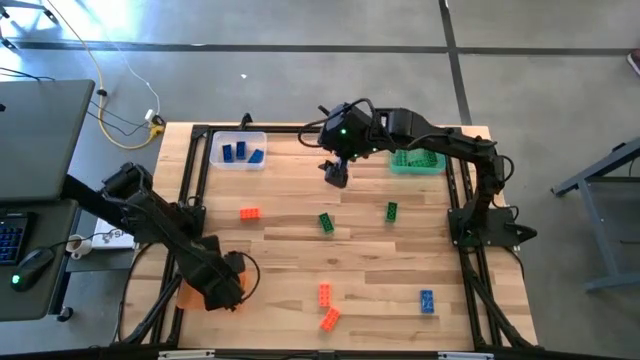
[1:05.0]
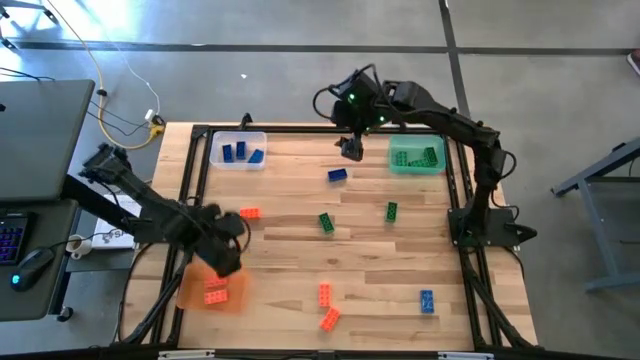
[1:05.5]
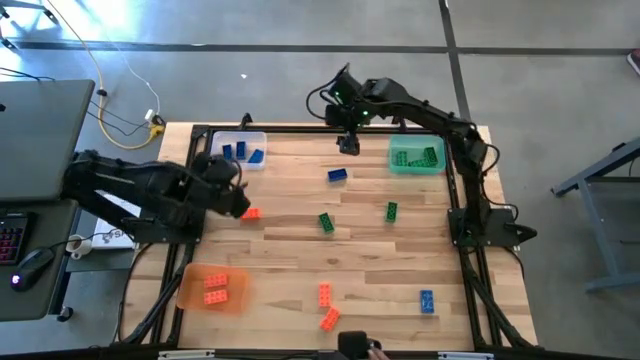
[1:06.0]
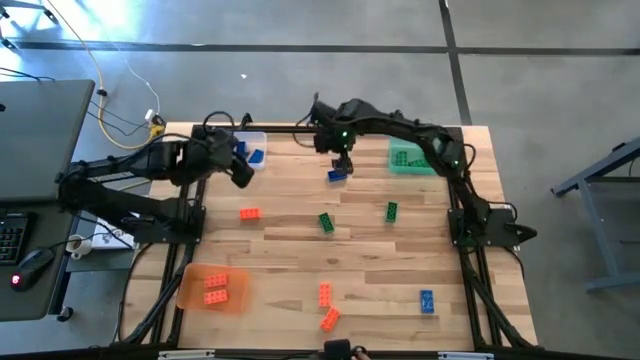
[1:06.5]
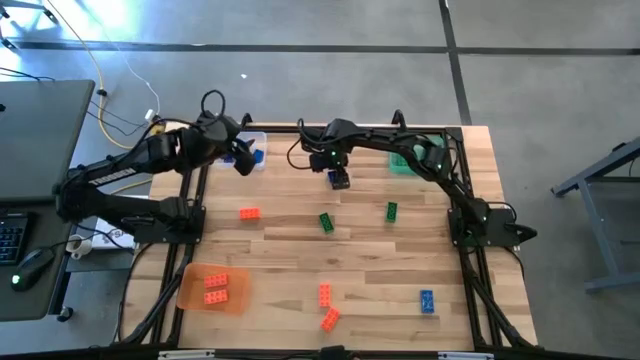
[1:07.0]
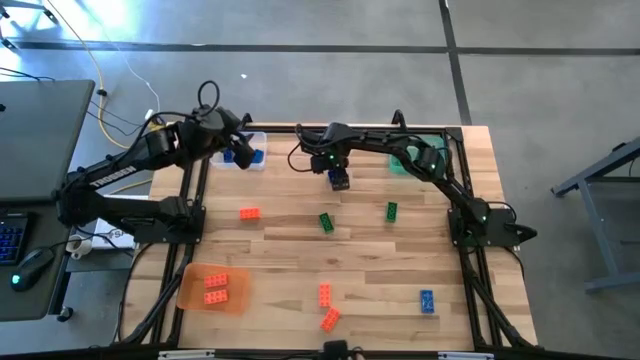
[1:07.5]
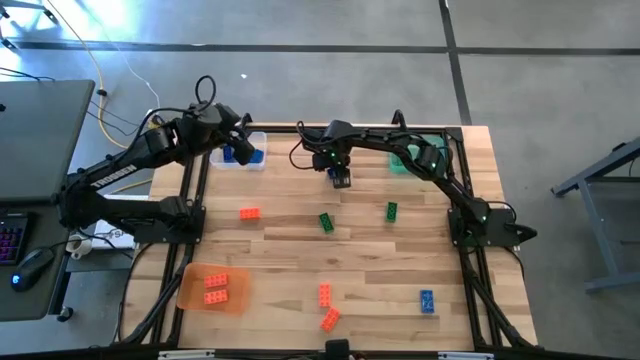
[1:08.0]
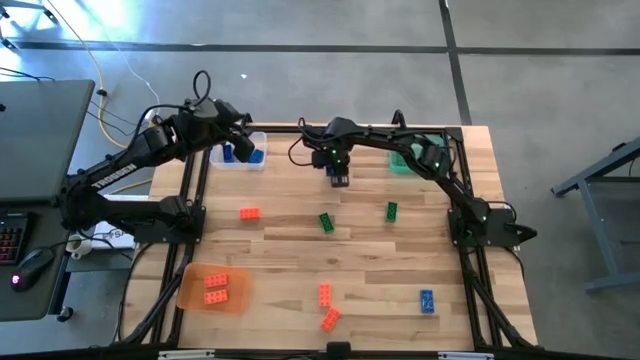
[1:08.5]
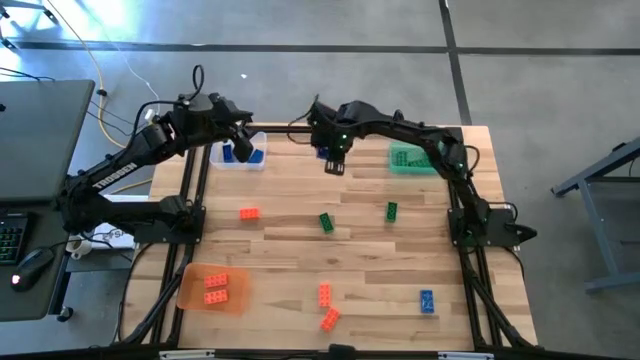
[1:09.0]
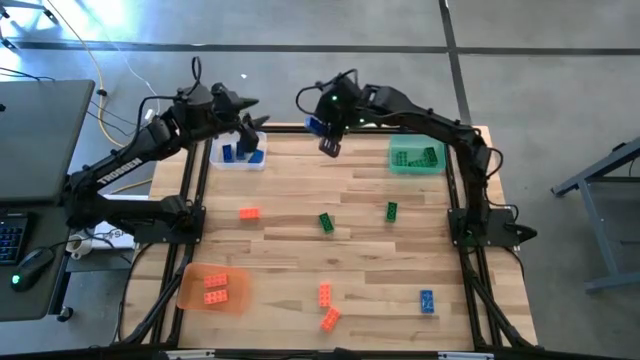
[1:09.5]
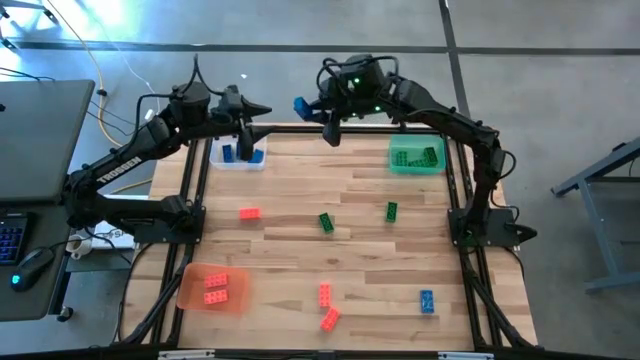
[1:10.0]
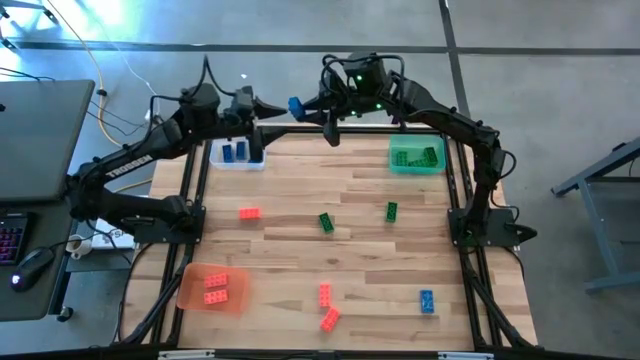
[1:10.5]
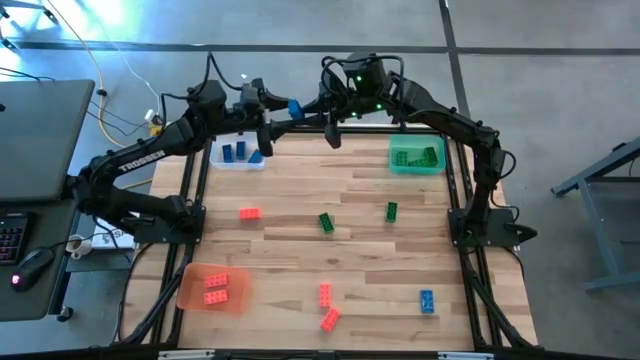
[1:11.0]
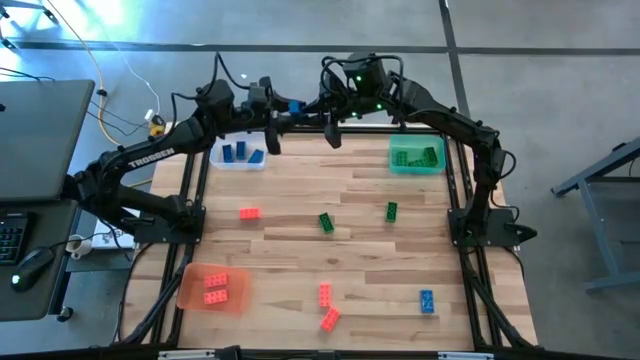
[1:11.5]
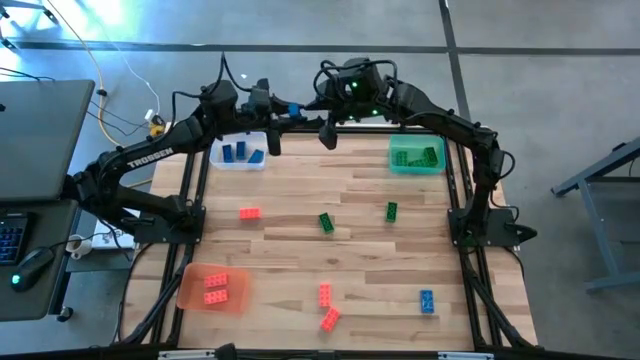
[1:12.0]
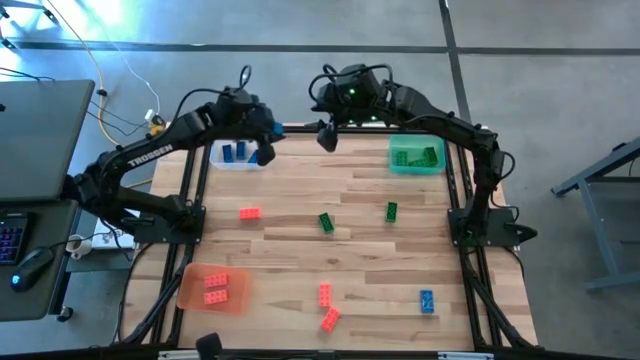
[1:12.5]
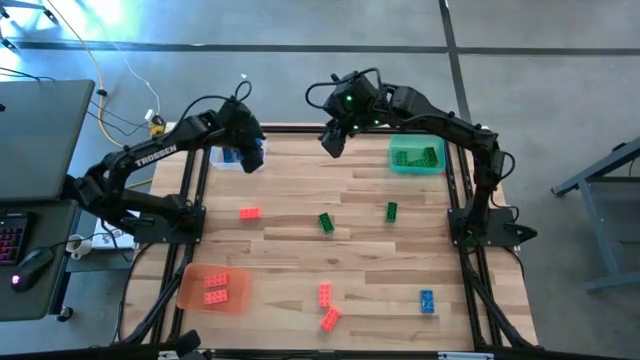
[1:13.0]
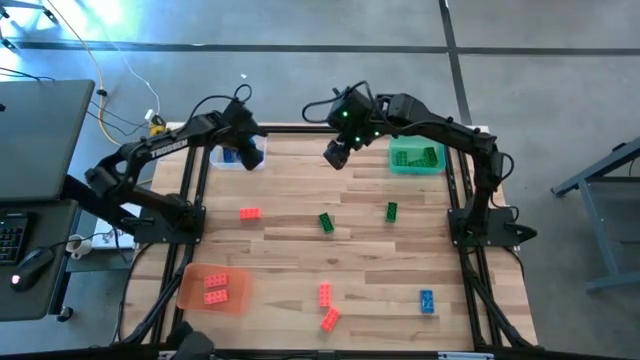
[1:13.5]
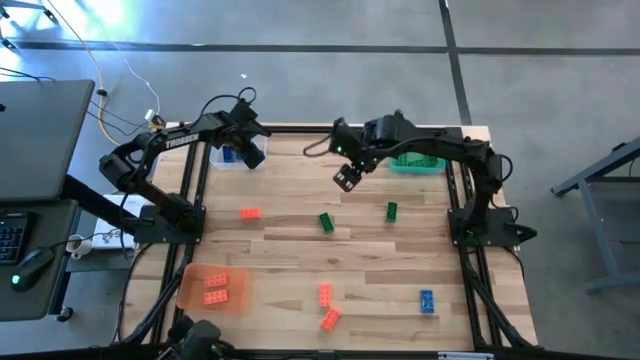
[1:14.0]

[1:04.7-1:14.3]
Task: Sort & place blocks by color
Put the blue game piece into the transparent bin

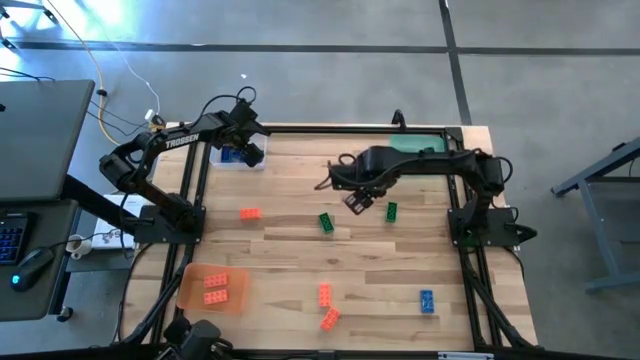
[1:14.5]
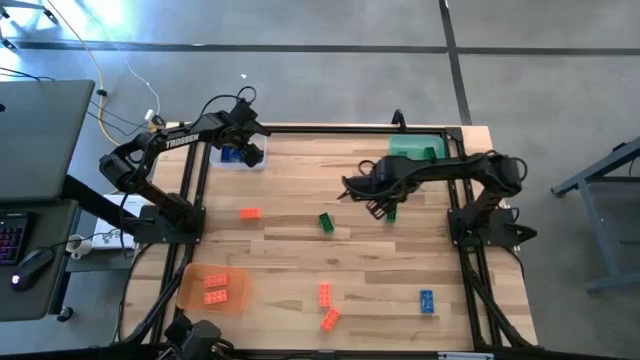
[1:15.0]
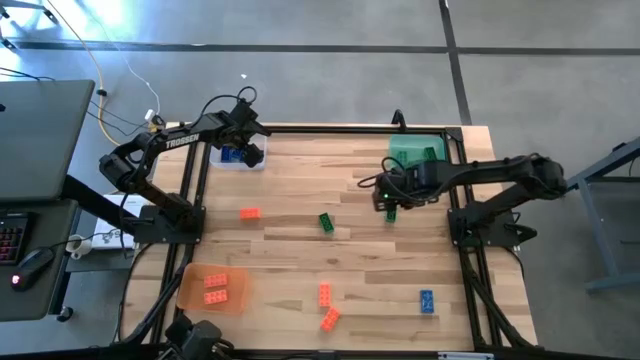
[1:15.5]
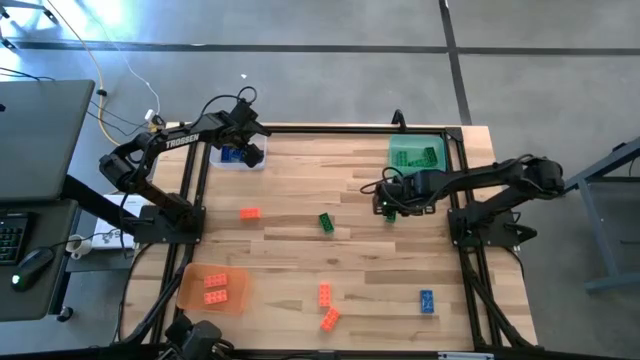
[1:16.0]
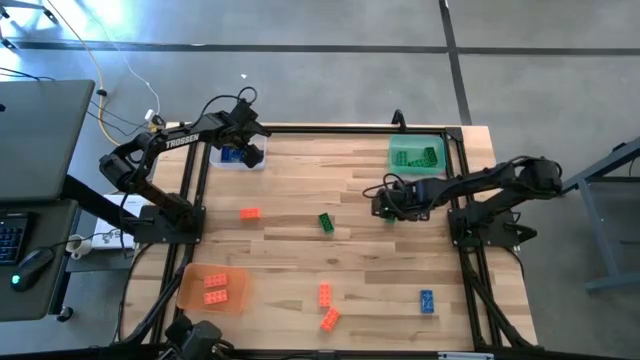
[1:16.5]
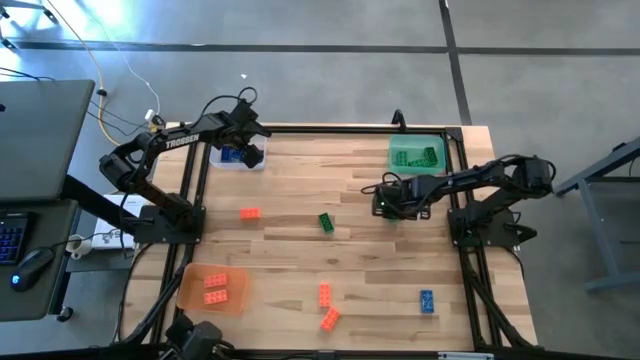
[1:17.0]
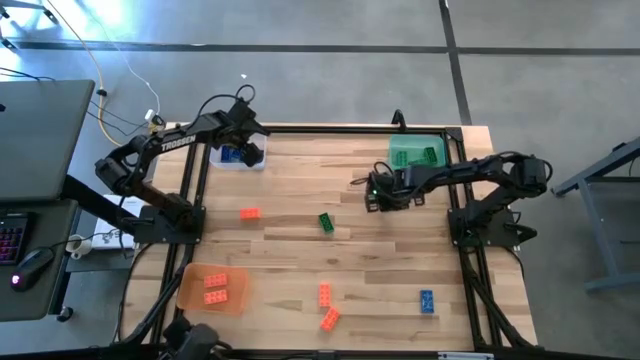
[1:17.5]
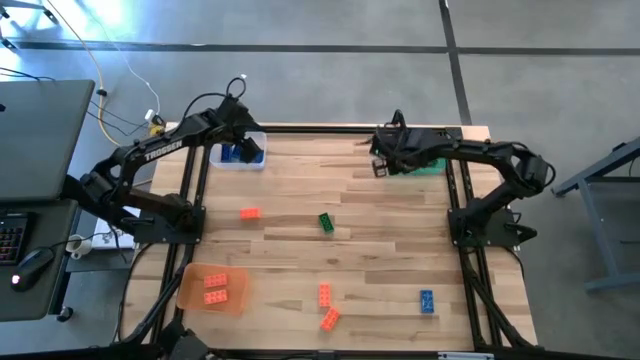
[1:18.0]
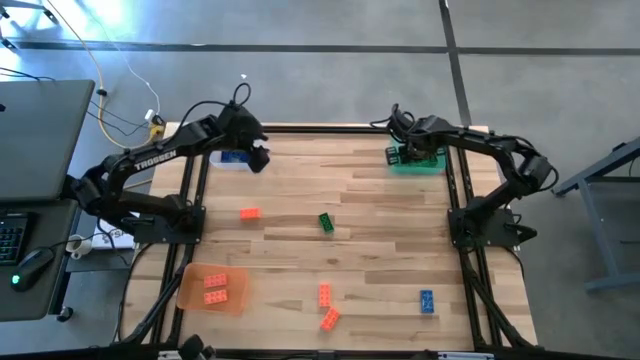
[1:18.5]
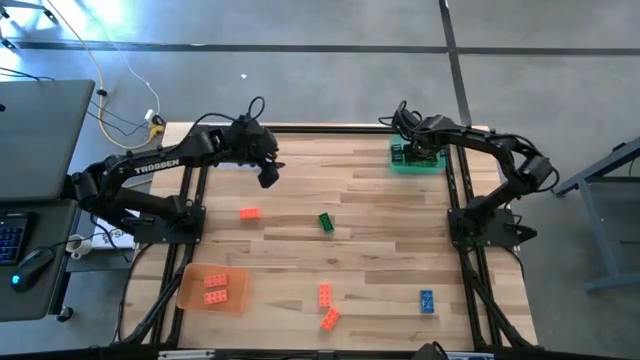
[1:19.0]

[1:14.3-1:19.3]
Put the green game piece into the green bin

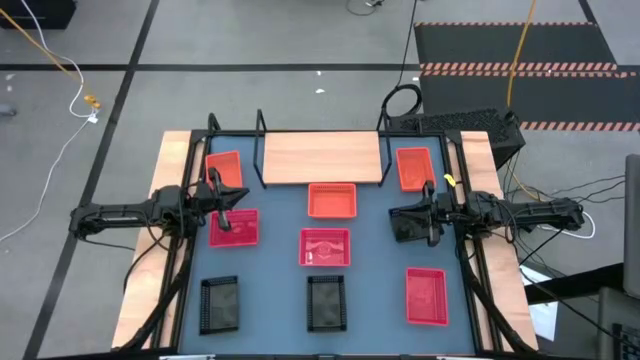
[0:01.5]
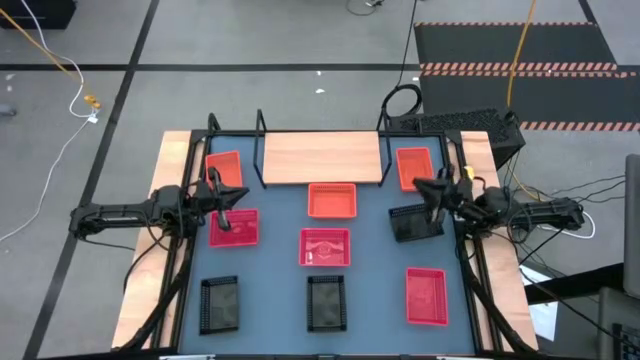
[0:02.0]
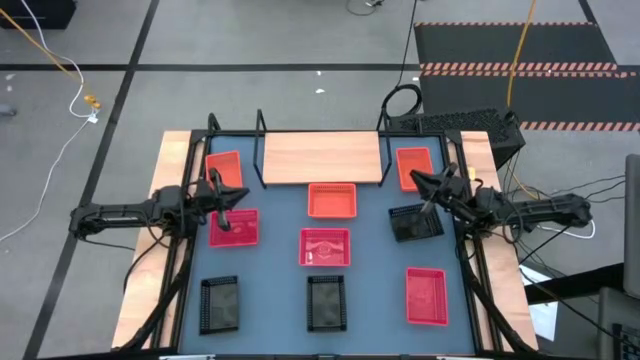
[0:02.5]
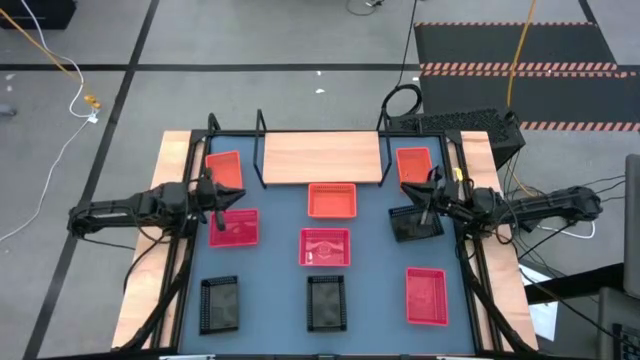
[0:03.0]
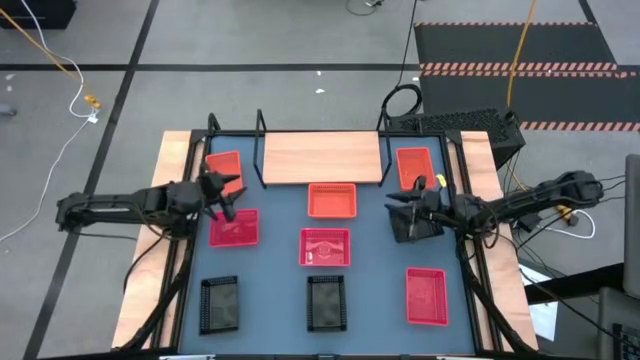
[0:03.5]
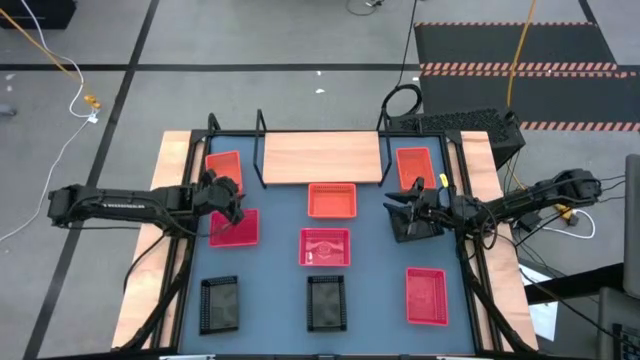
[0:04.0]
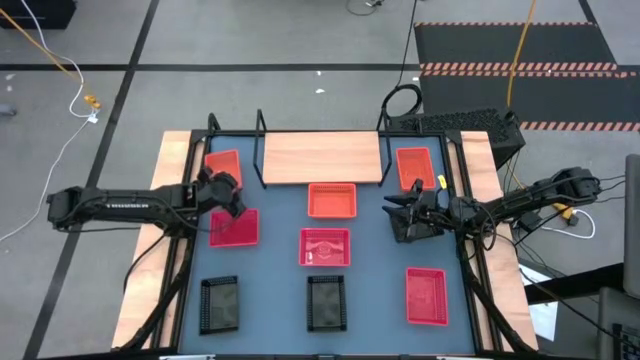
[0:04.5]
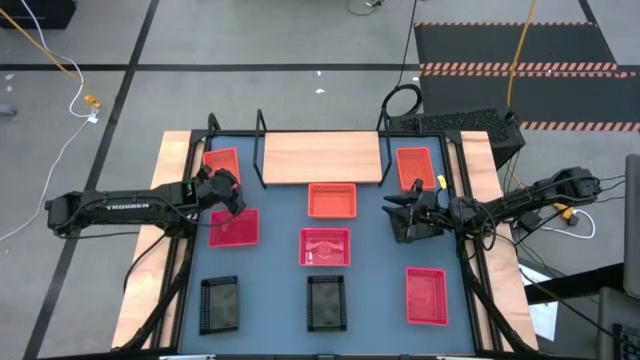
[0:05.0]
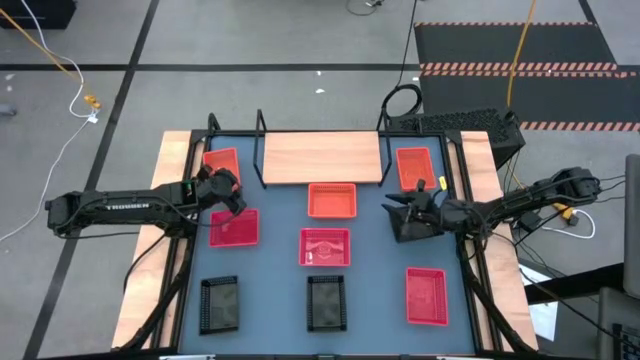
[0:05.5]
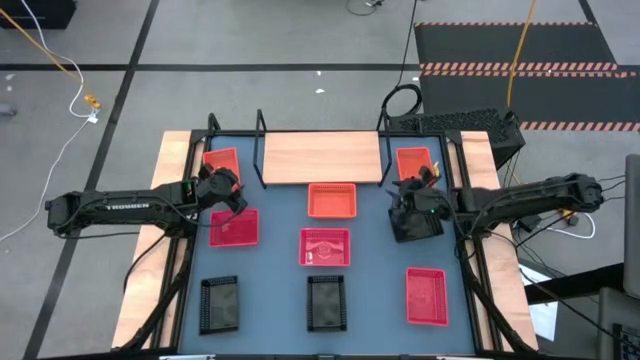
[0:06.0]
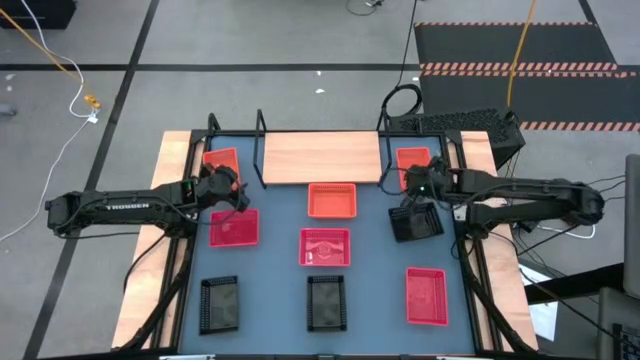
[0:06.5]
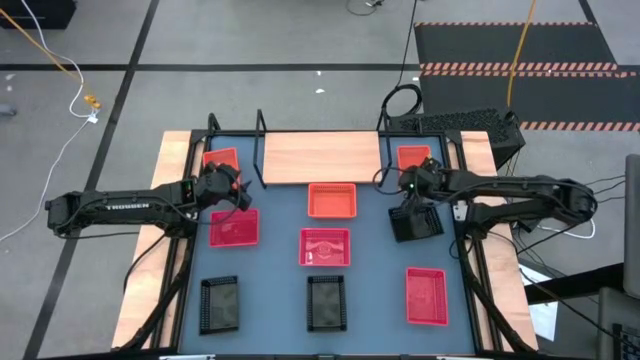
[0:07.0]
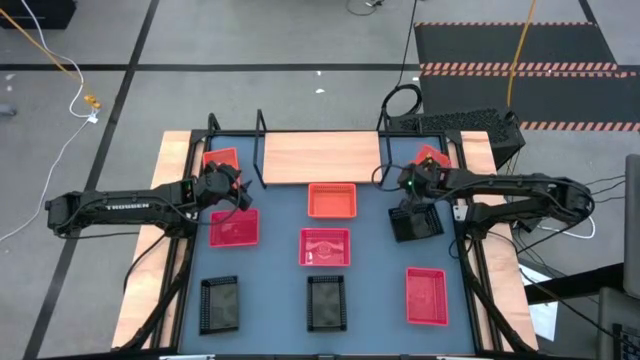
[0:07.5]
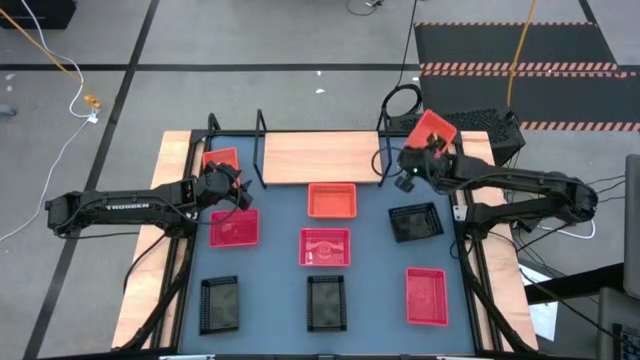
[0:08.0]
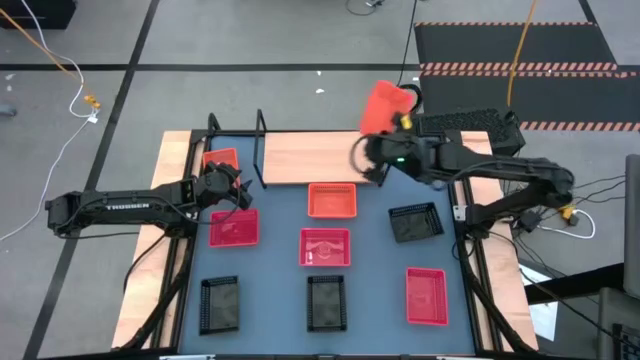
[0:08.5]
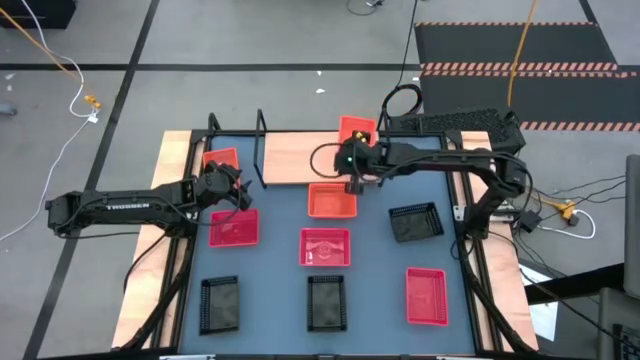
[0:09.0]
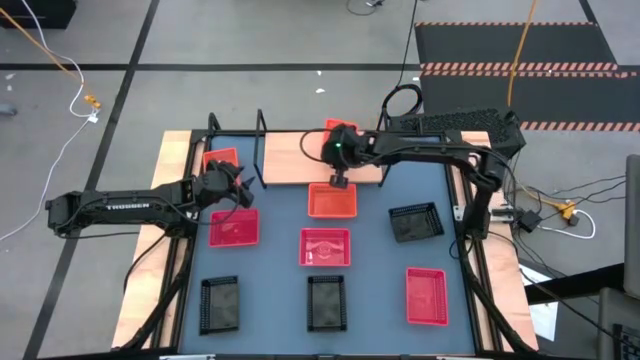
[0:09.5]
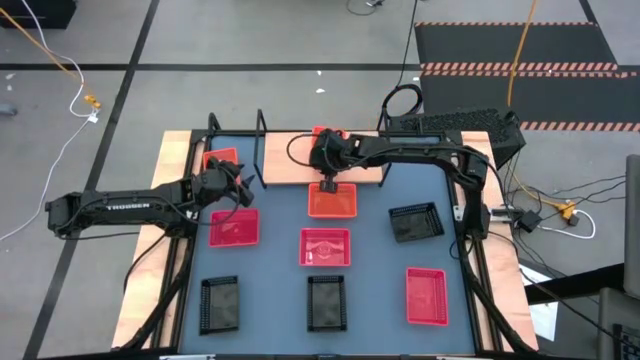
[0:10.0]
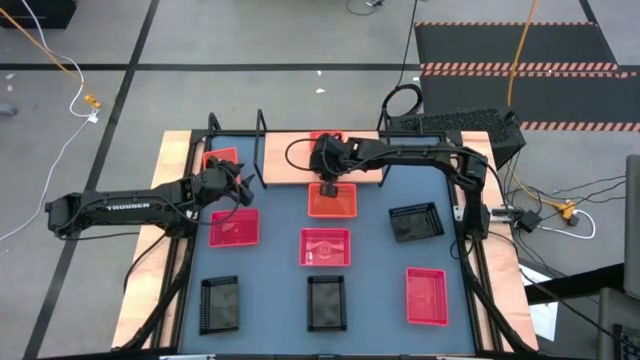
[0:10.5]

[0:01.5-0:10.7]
Task: Stack baskets on shelf by color
Put the right orange basket on the shelf
